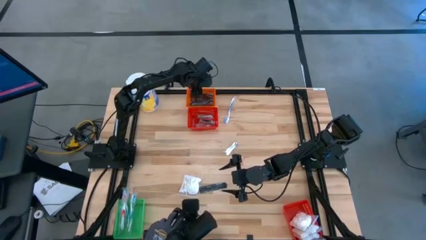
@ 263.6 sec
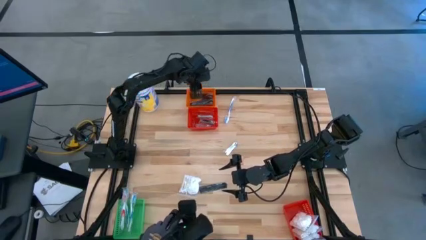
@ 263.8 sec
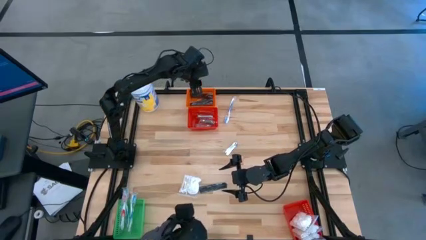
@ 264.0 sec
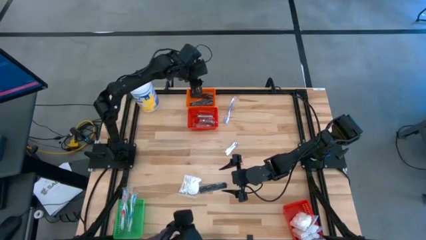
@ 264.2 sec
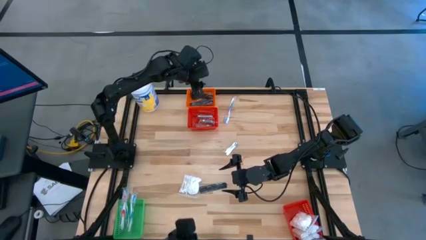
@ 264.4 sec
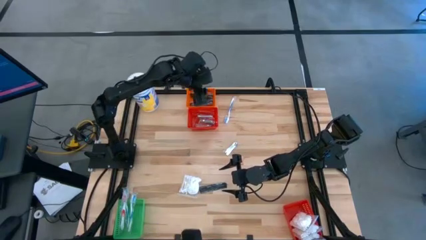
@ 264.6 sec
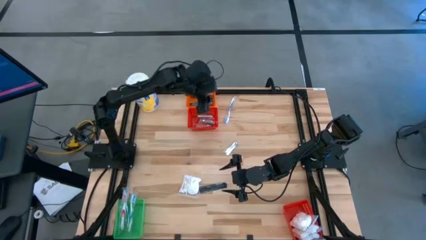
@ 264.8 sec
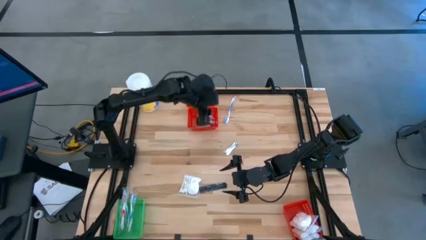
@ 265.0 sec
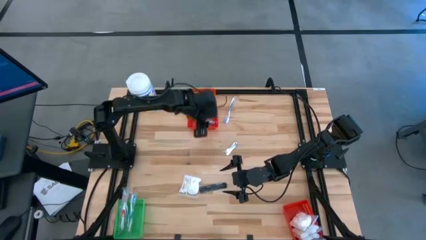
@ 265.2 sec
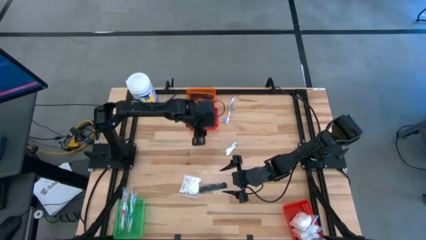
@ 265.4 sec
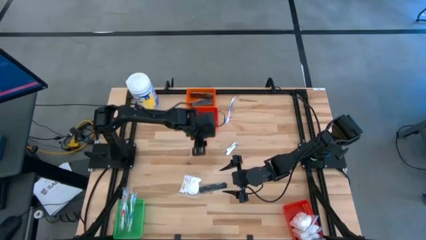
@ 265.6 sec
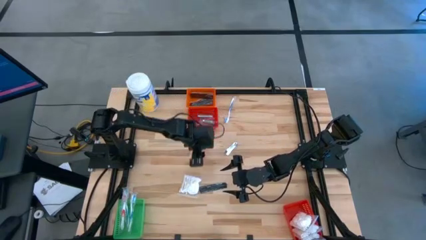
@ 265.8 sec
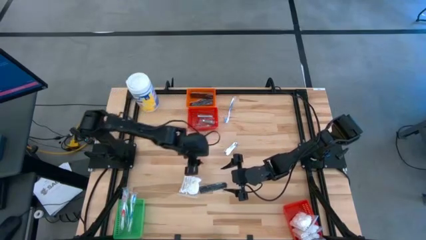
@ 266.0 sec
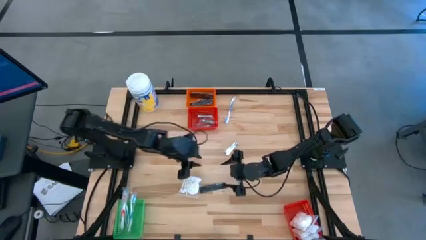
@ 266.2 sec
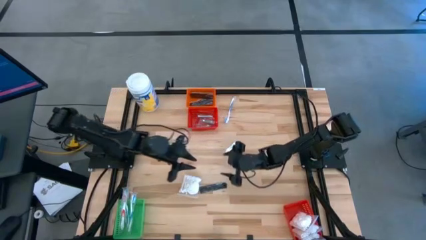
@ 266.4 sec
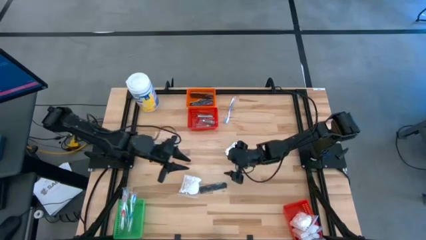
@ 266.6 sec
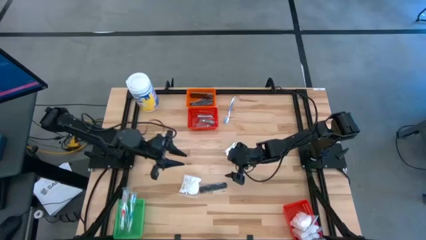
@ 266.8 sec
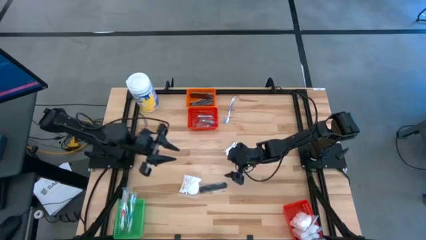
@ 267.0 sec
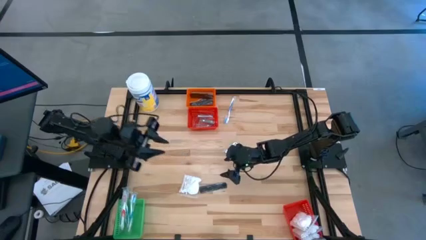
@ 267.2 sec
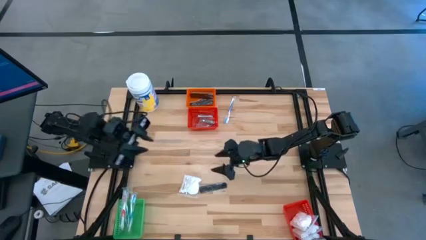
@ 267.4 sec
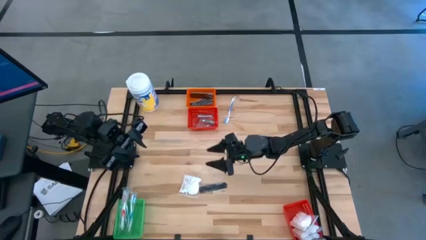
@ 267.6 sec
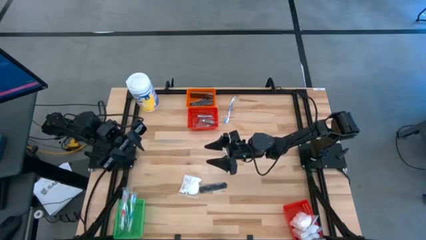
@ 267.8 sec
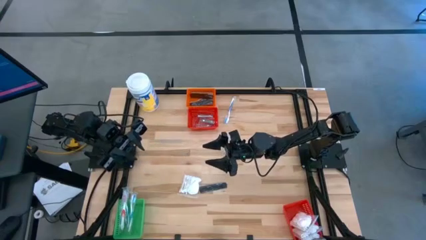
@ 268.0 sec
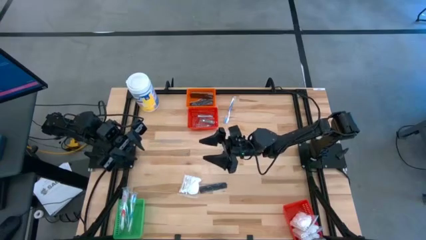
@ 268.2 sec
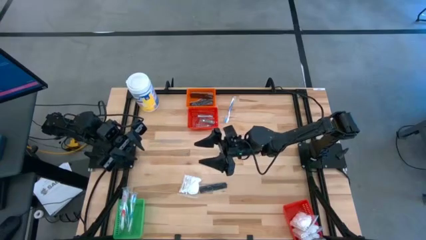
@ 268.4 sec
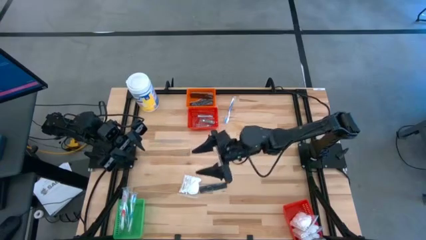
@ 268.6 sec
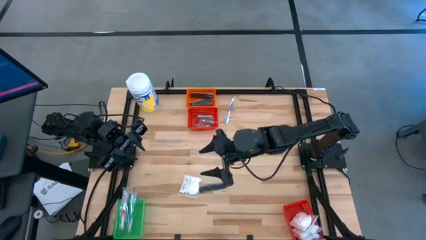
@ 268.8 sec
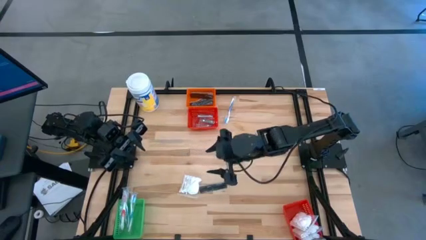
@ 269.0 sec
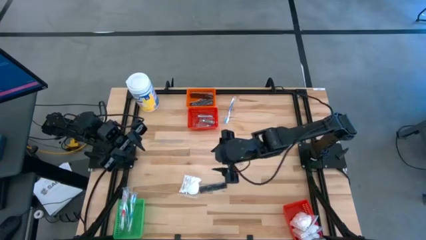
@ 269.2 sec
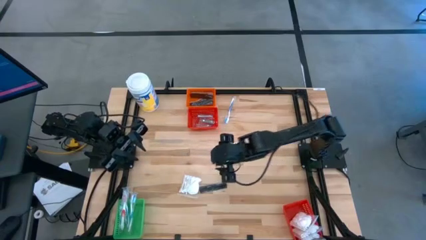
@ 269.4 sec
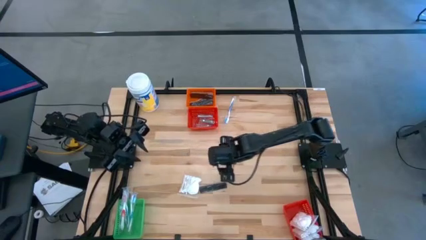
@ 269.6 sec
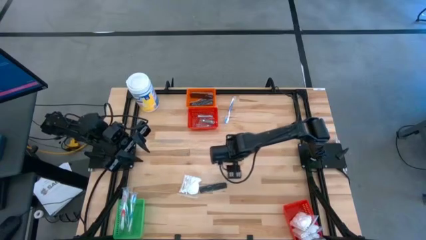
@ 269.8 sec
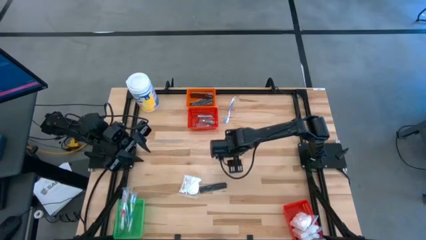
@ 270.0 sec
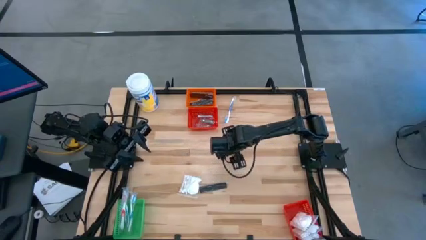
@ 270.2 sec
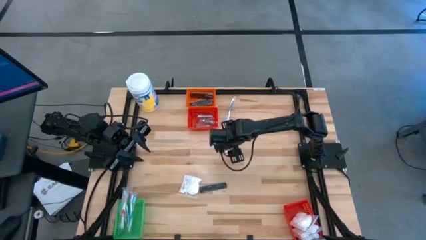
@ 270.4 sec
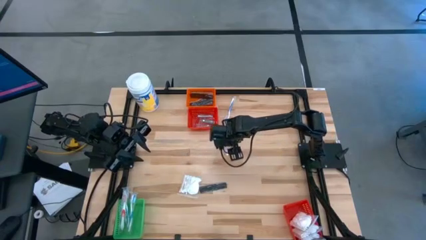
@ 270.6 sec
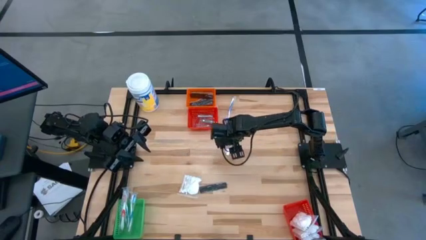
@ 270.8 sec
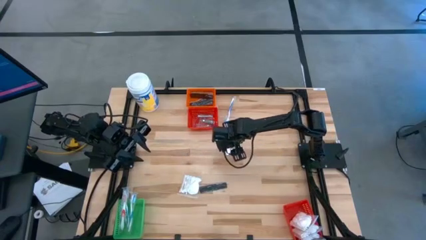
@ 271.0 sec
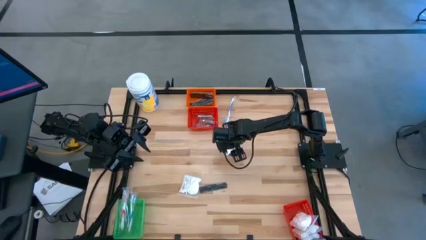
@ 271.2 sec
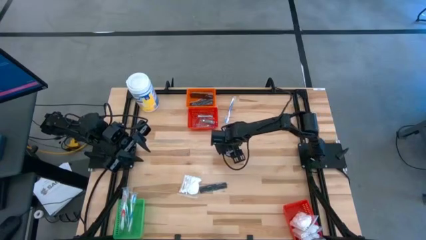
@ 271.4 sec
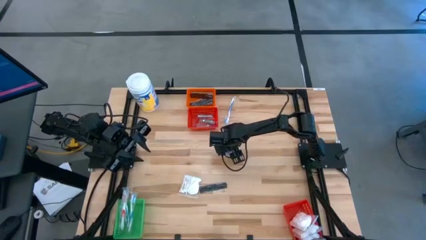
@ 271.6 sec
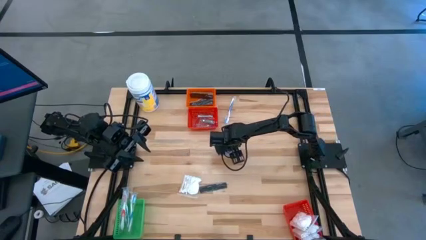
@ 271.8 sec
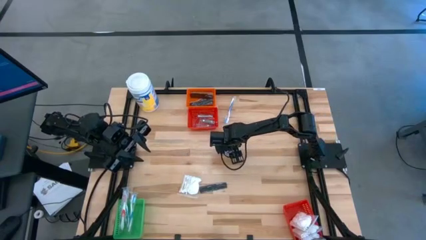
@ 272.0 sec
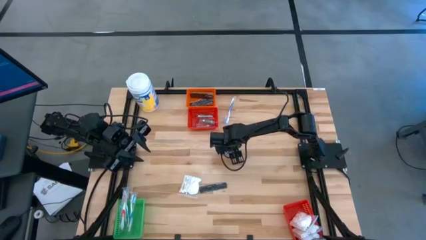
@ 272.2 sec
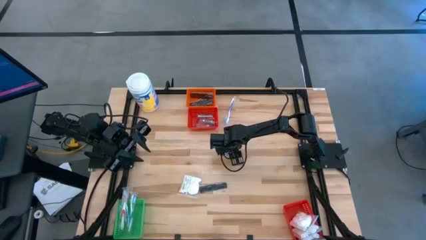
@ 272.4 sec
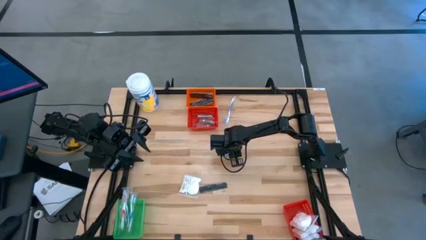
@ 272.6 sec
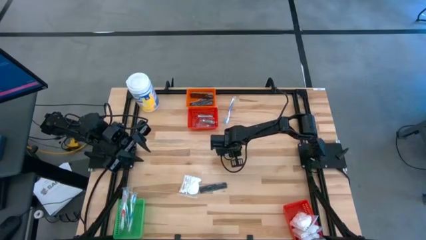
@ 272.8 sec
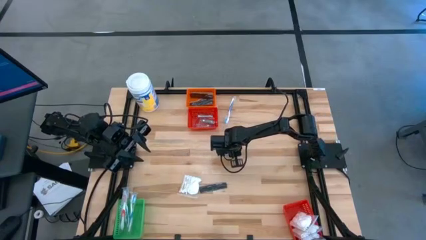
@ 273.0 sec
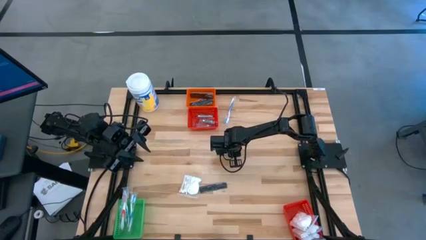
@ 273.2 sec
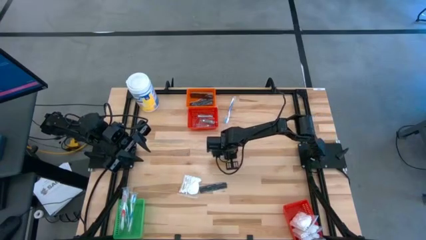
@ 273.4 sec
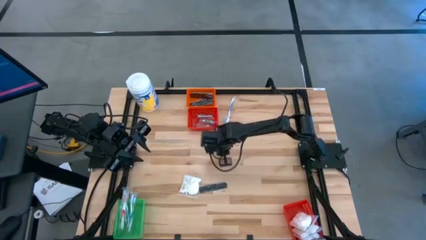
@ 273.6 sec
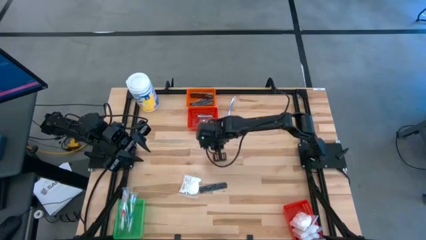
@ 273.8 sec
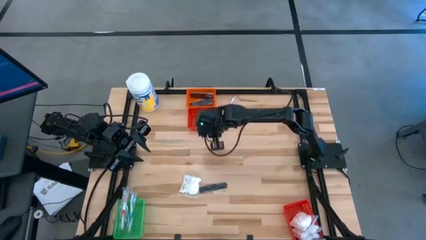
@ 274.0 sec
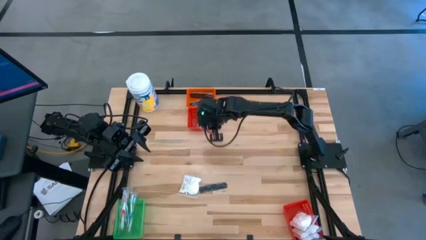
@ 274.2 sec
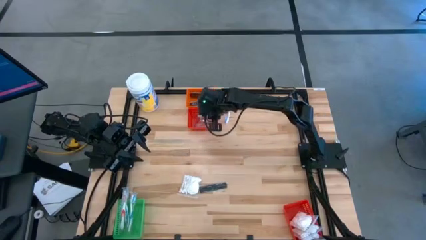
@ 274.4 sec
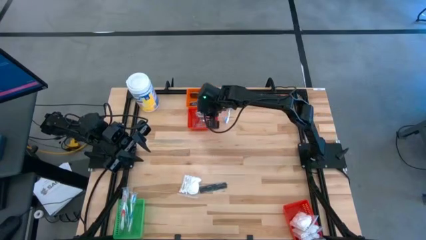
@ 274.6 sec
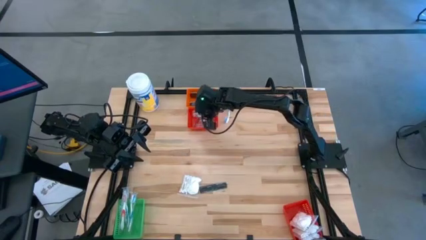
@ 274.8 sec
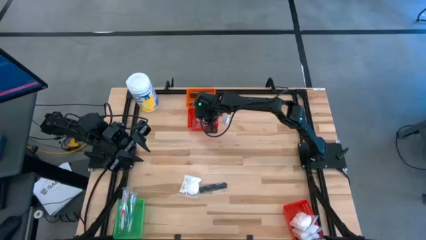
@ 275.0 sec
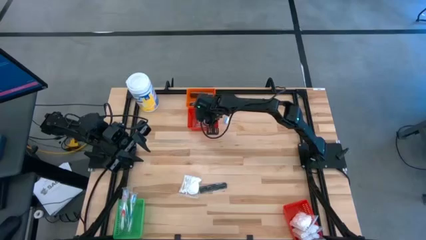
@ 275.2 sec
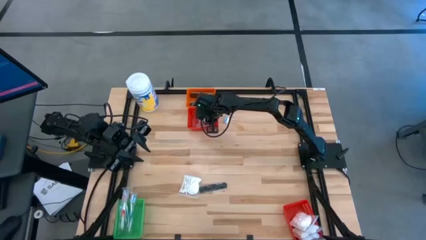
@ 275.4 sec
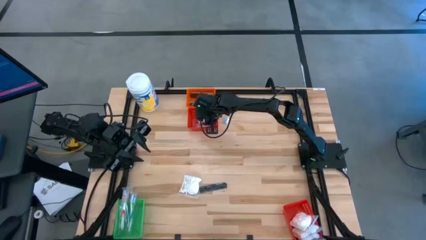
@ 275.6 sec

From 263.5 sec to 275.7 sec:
Task: Pick & Place Travel size toiletries
Put the nail cutter into the top red basket

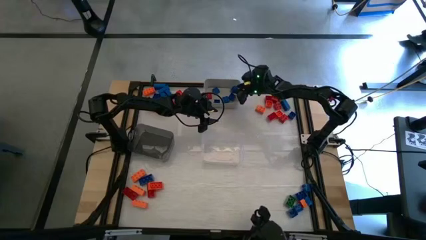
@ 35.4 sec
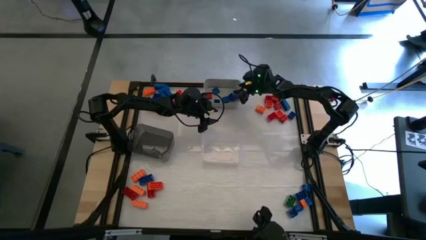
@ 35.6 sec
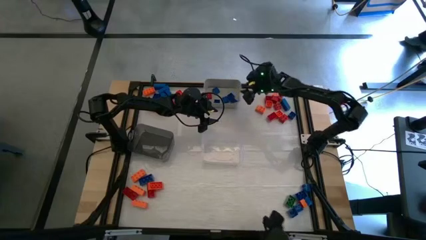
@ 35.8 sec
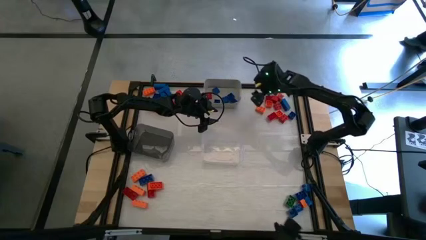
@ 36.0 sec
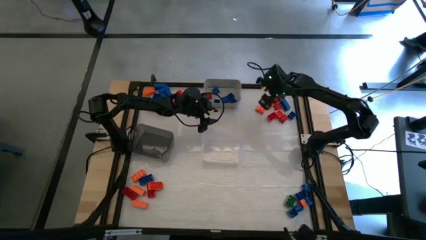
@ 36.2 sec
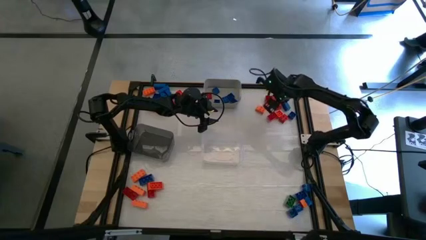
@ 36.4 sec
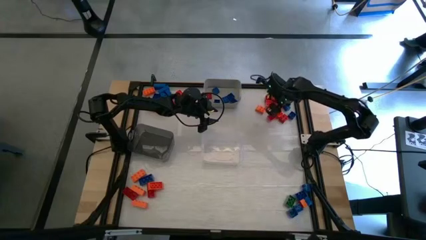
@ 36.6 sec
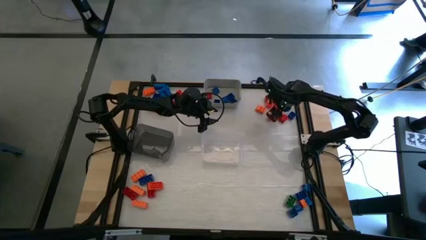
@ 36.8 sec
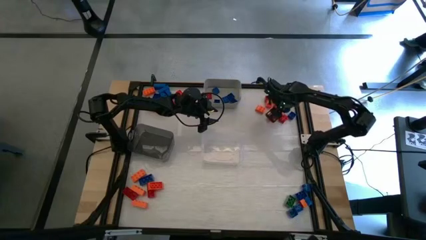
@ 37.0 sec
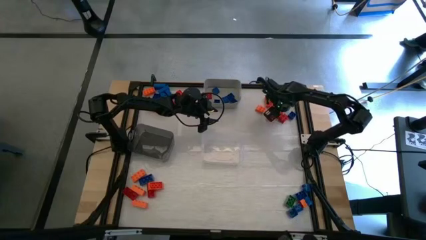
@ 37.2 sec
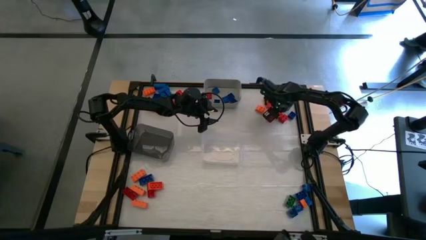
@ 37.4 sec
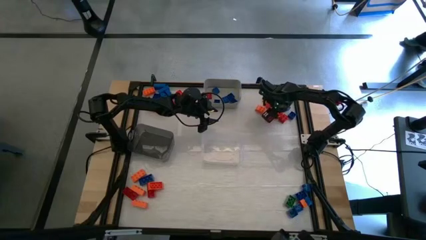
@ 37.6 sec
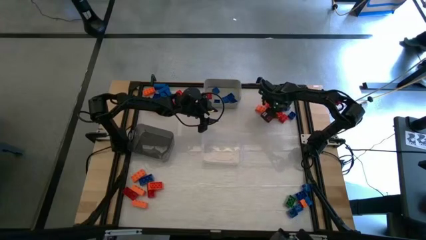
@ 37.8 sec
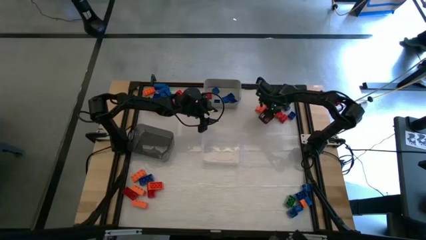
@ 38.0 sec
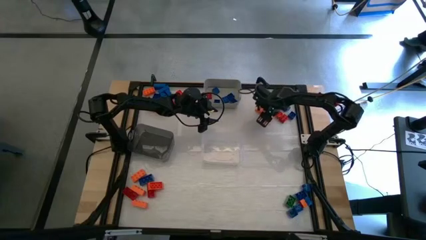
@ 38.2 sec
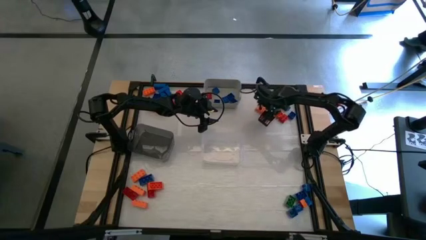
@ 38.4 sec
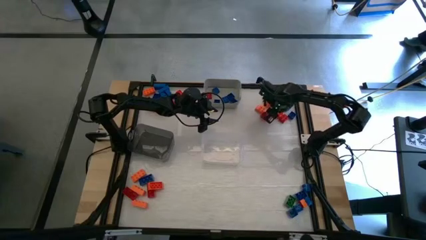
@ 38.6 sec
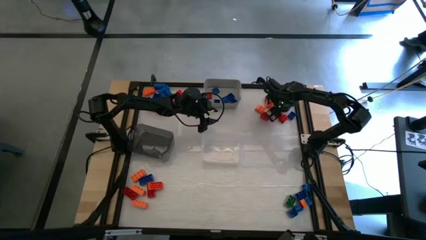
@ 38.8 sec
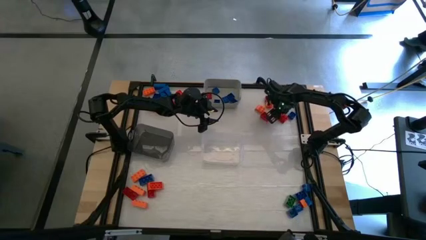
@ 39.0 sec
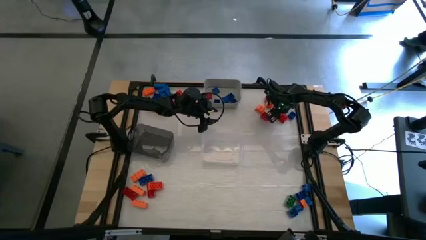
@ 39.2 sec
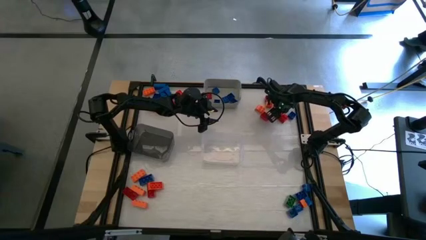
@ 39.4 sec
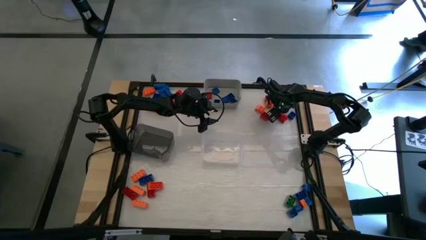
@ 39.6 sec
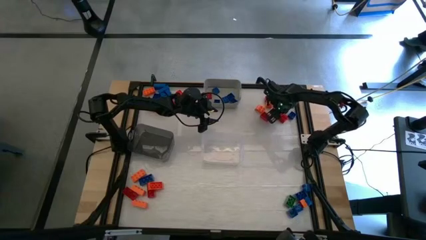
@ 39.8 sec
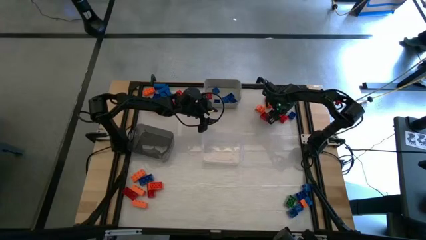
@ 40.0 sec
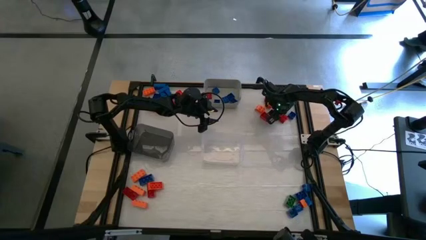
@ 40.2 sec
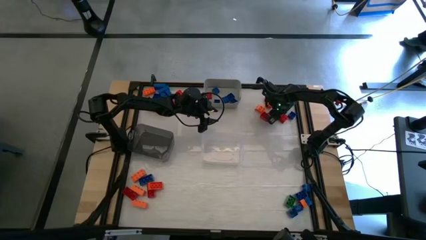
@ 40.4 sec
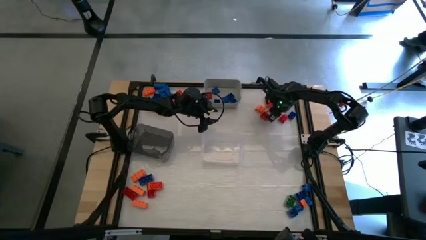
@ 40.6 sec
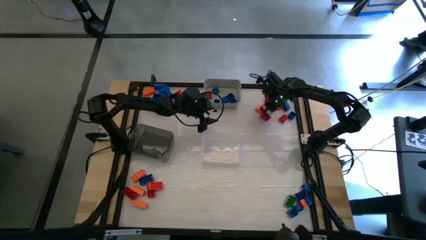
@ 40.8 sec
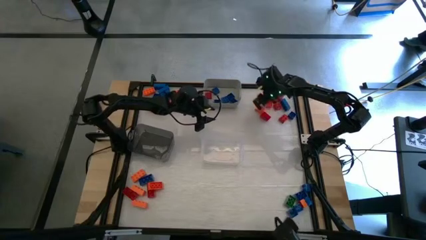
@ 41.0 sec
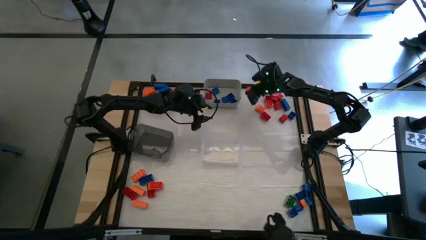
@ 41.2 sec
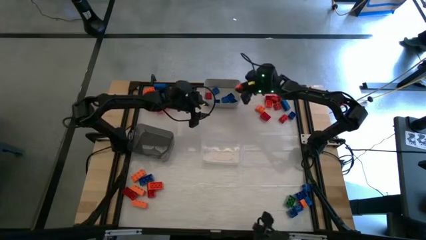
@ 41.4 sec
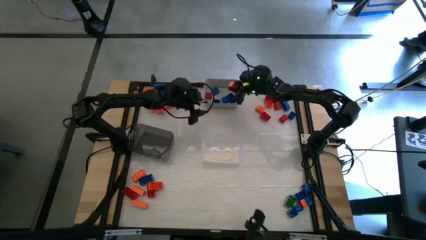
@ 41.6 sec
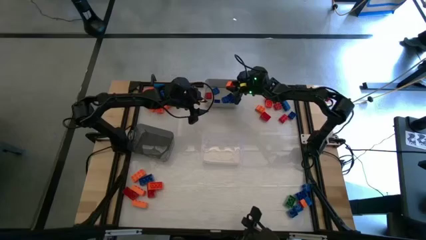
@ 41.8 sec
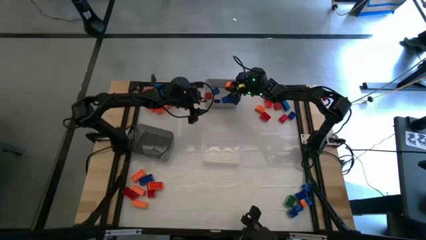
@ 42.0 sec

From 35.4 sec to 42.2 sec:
Task: Sort blocks by size
Put the small orange game piece into the gray bin
